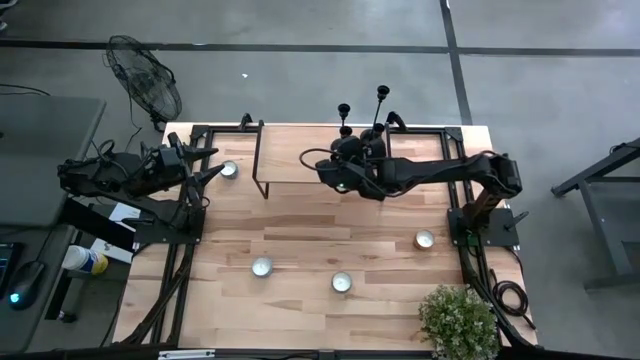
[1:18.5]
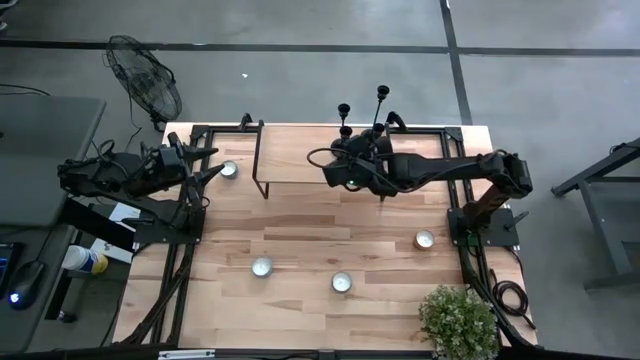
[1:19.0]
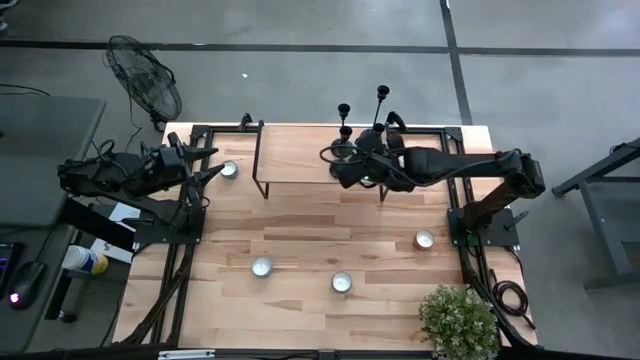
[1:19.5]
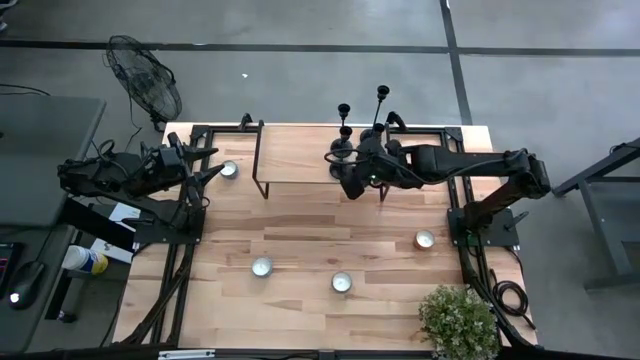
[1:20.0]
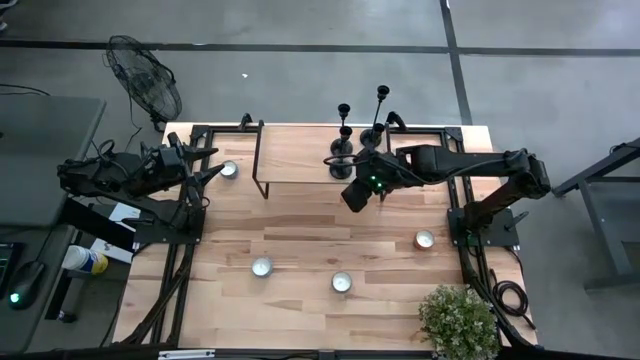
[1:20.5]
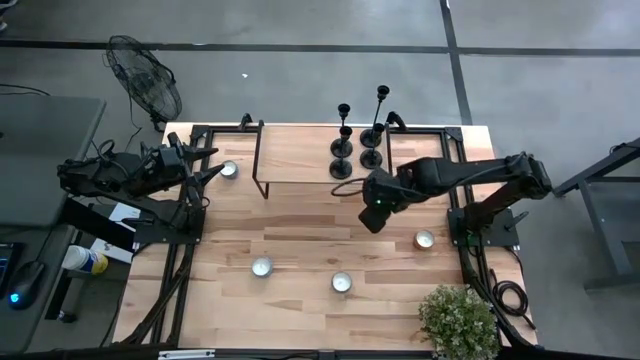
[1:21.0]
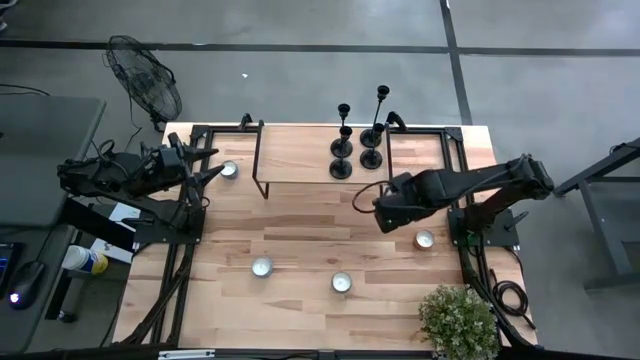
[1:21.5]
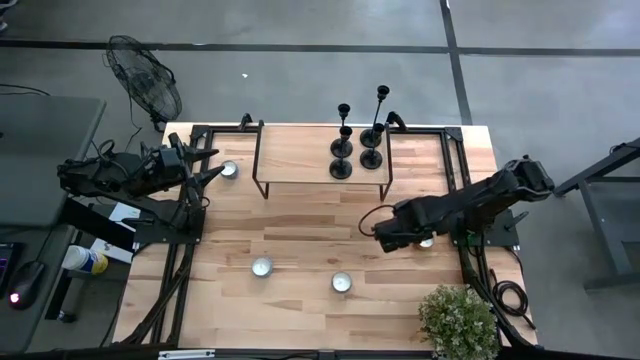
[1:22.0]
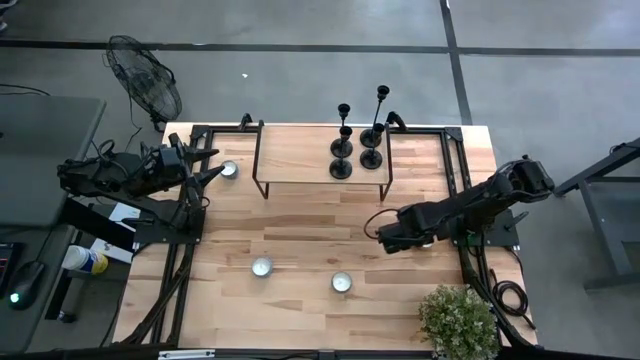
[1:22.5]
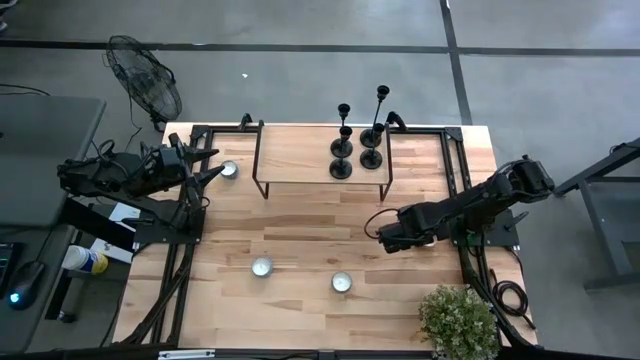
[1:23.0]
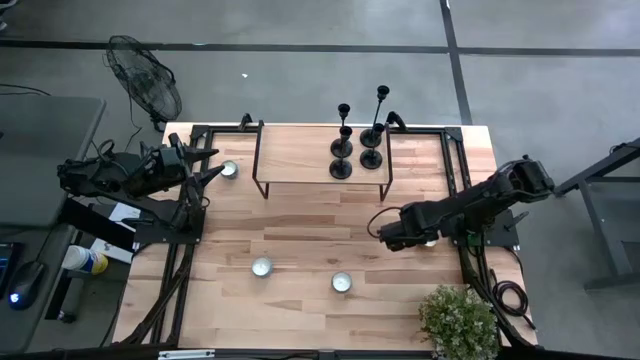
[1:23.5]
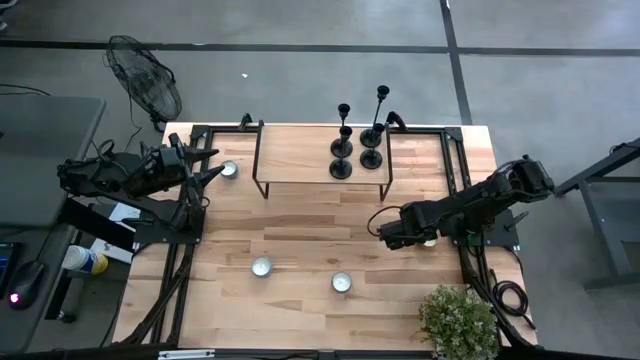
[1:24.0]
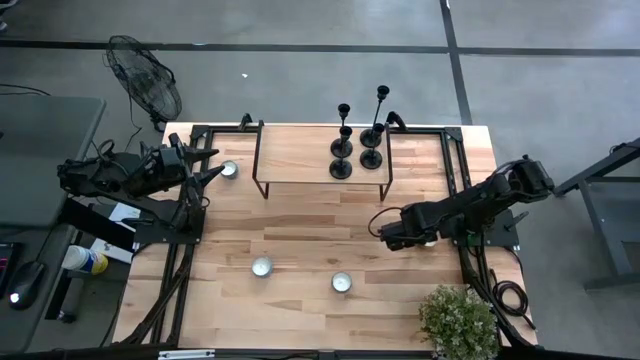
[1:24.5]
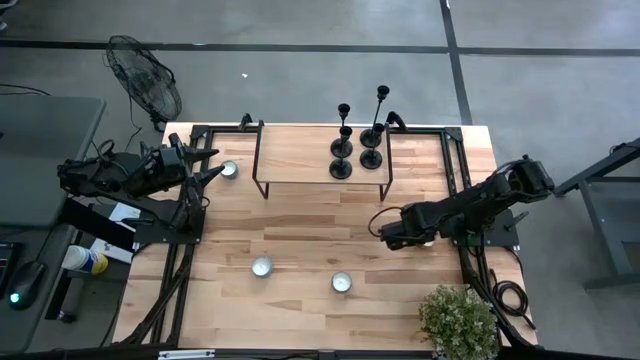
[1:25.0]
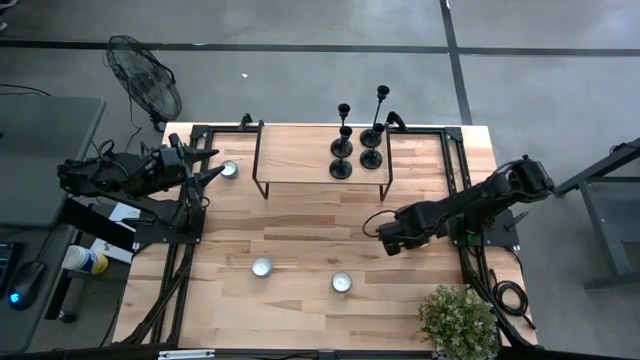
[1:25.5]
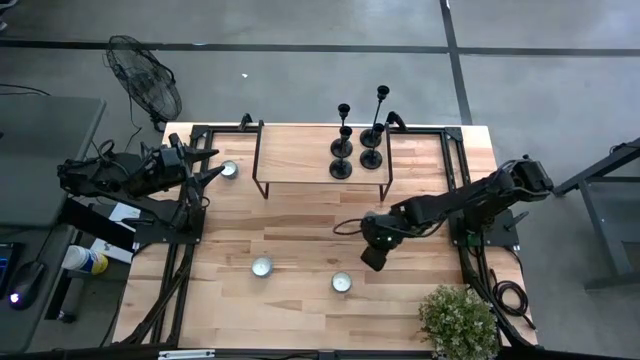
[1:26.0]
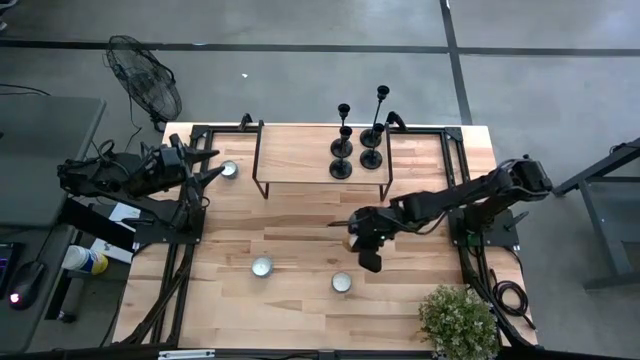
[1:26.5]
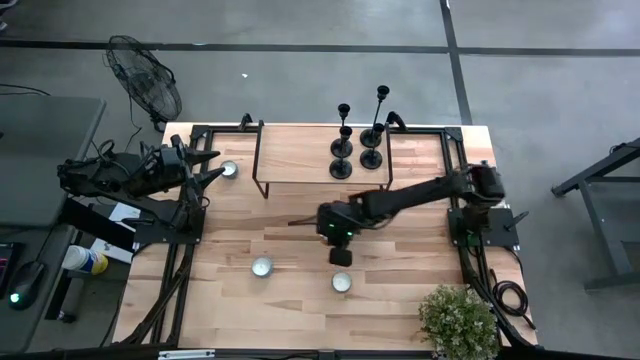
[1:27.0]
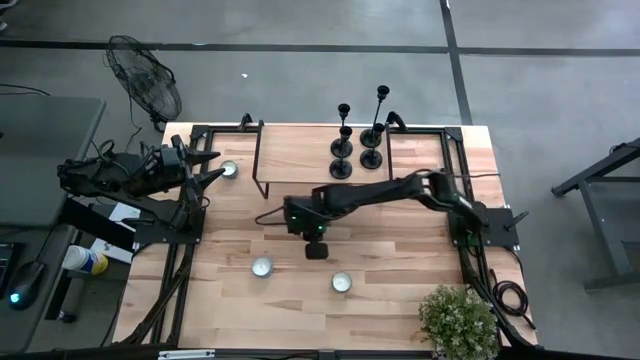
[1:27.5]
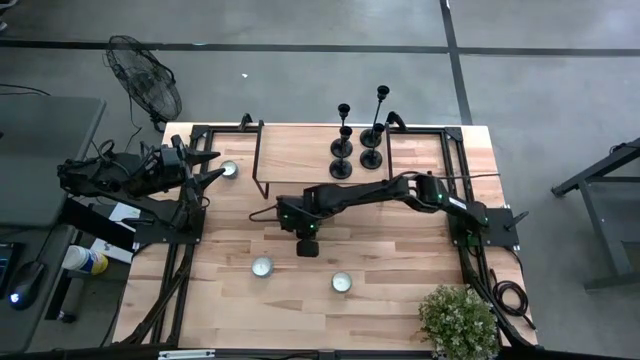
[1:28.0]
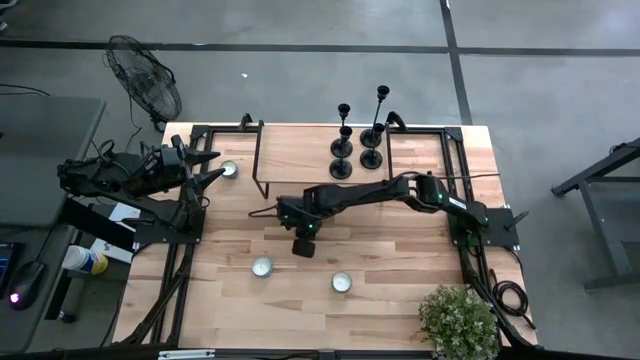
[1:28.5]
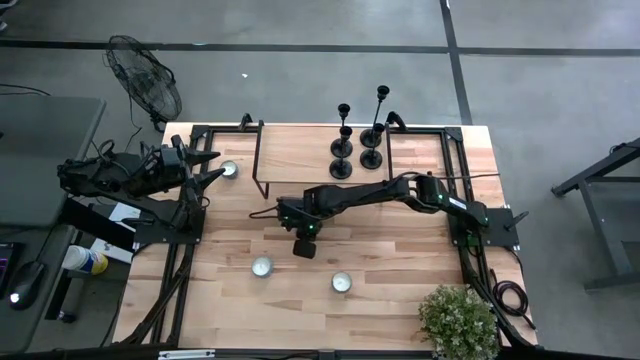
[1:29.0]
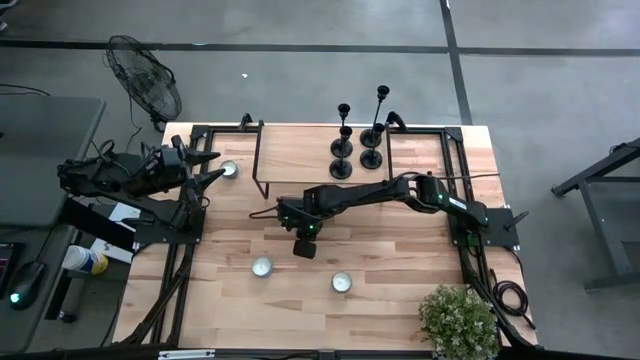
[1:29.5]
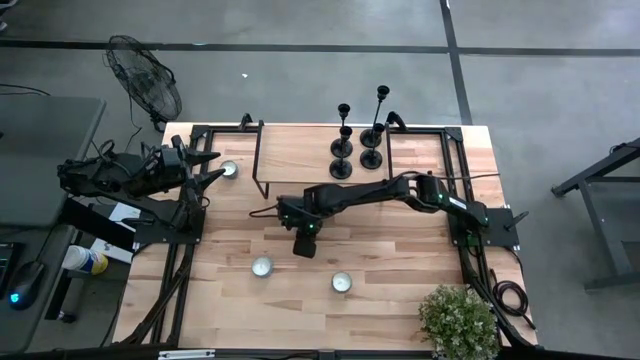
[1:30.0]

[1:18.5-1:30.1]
Task: Pick & Place candle stick holders
Move the yellow scented candle to the middle of the table

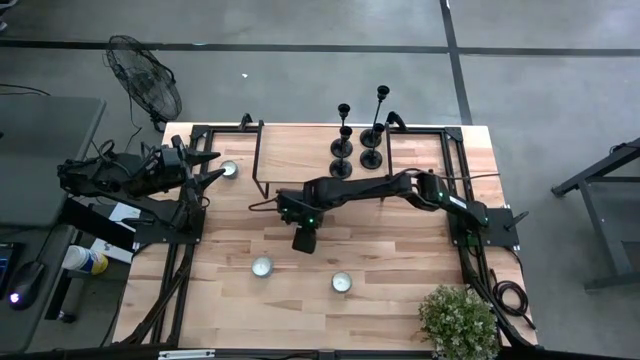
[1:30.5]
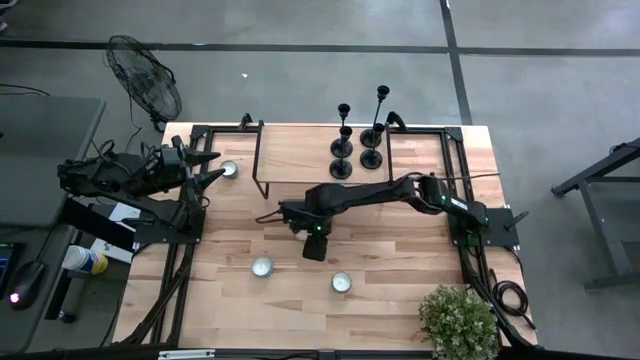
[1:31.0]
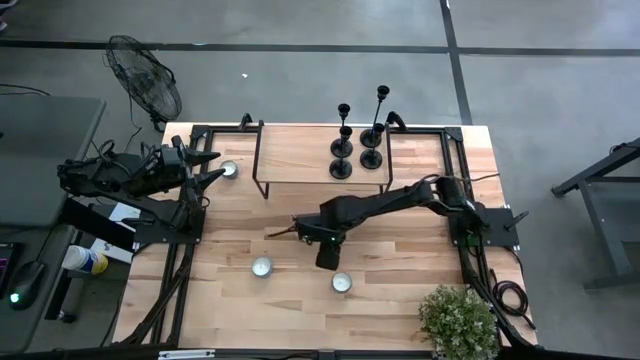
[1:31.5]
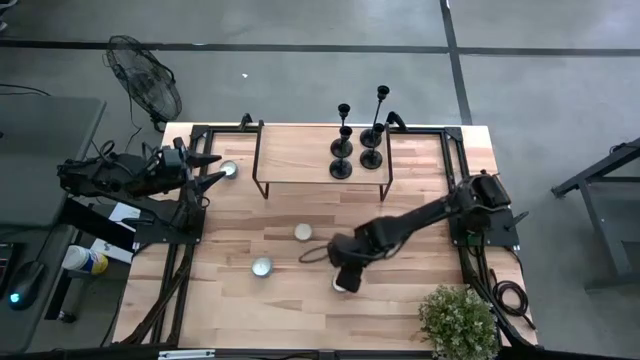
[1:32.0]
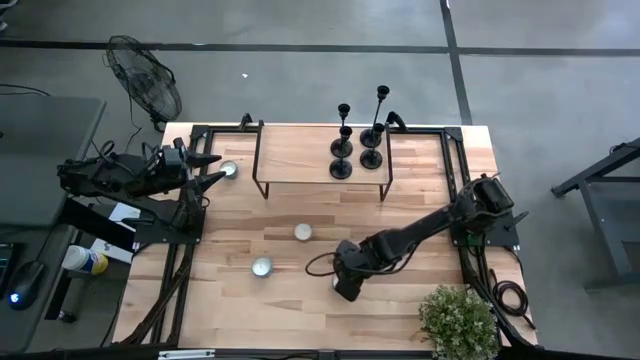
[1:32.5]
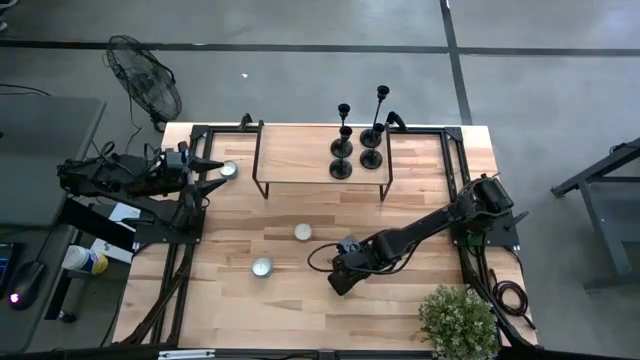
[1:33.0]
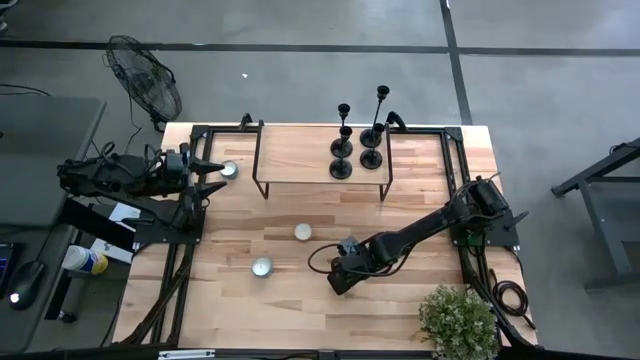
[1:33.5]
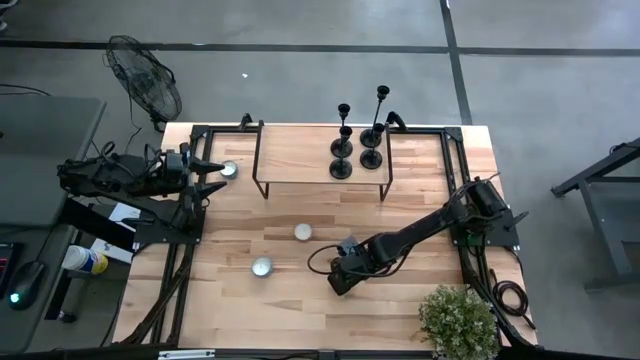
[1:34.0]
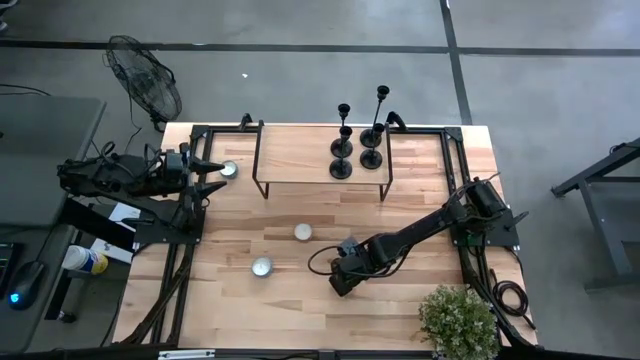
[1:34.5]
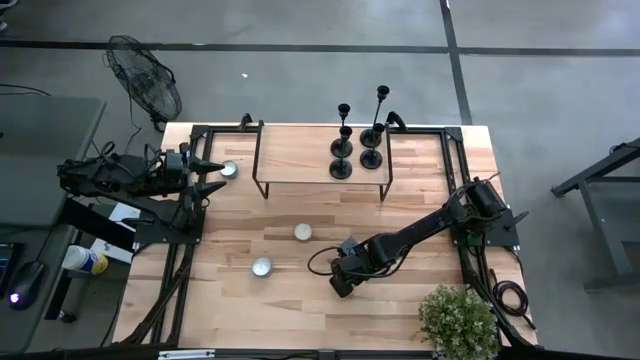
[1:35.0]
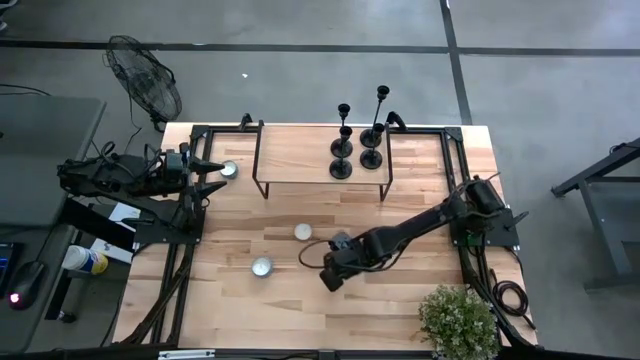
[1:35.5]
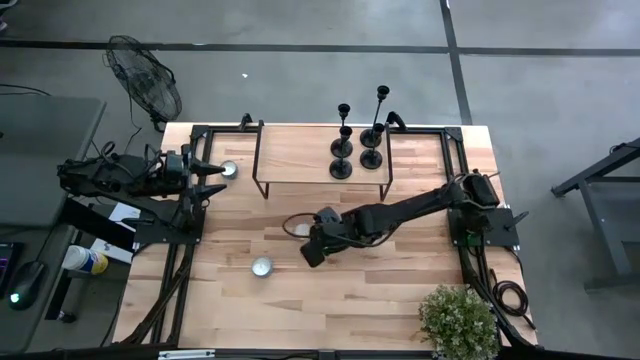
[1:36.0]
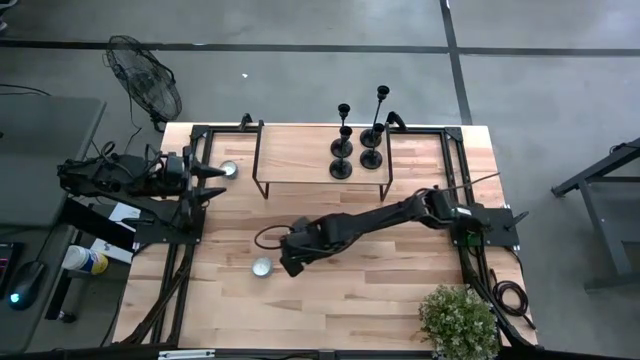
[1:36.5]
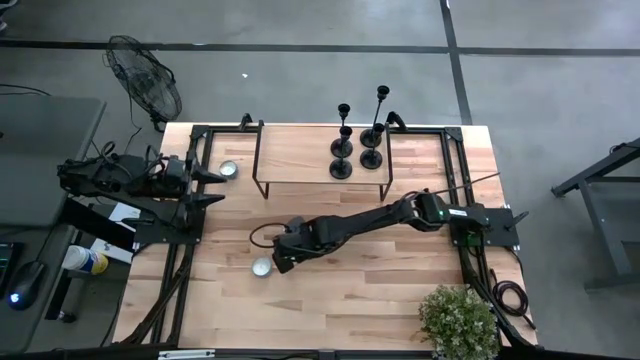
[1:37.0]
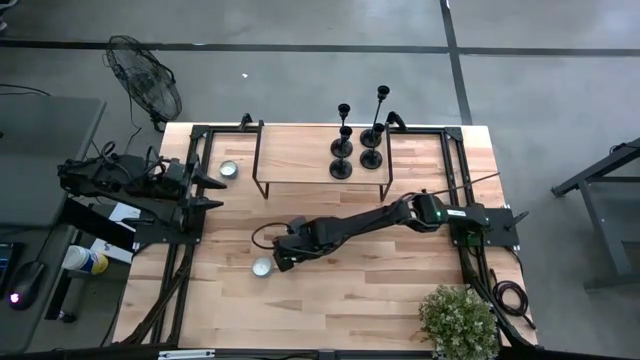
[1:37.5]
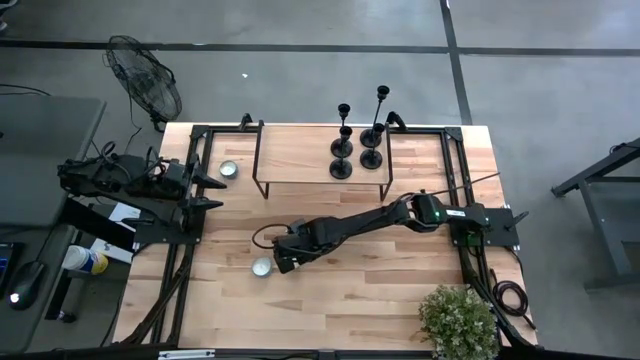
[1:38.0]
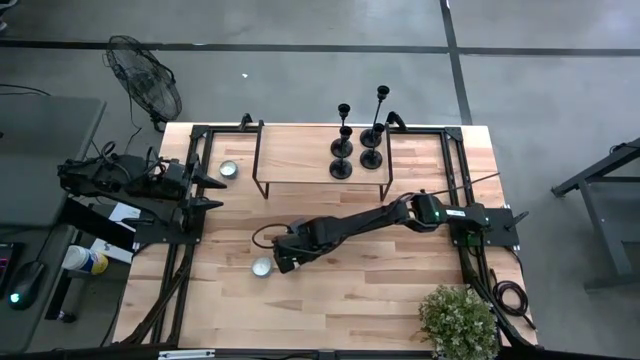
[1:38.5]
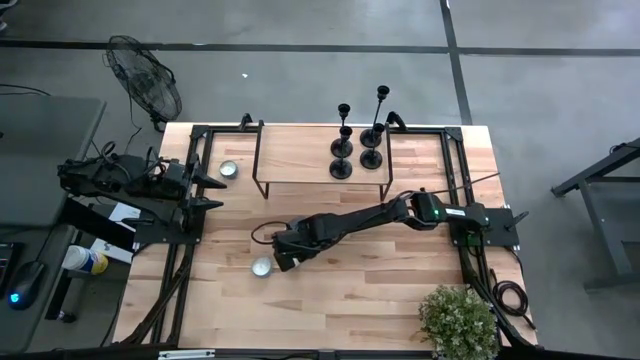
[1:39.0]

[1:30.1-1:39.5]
Move the red scented candle to the middle of the table

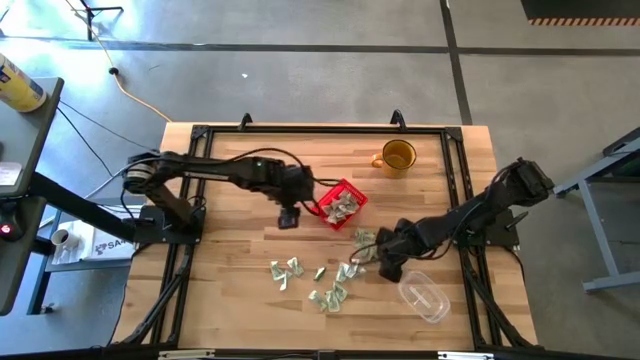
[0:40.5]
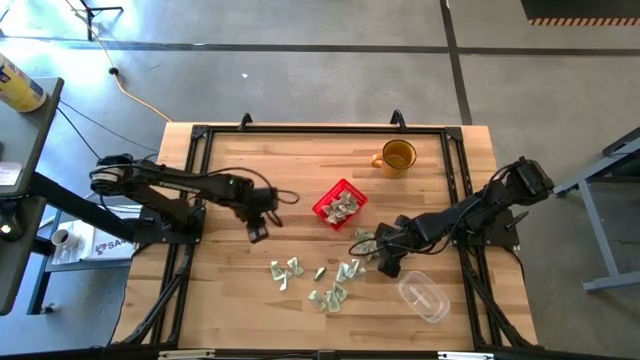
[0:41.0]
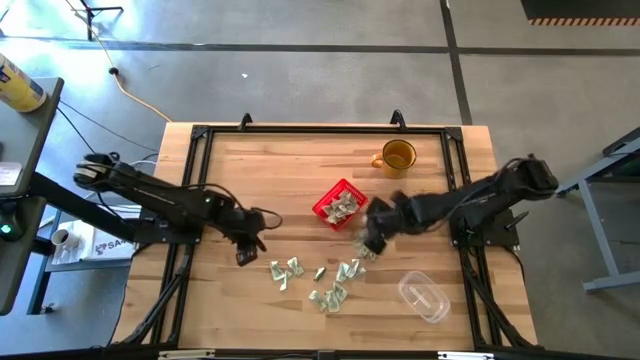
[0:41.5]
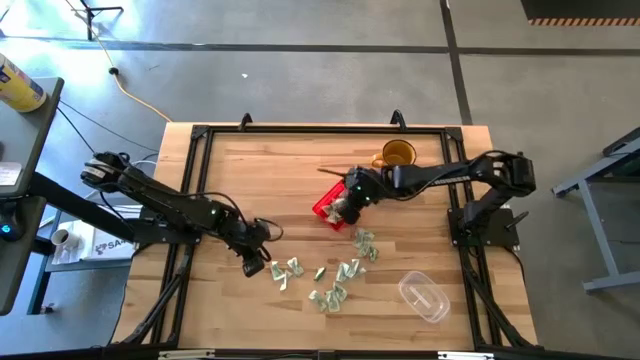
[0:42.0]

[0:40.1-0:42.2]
Task: Pick and place items into bin
Put the white stevia packet into the red bin
